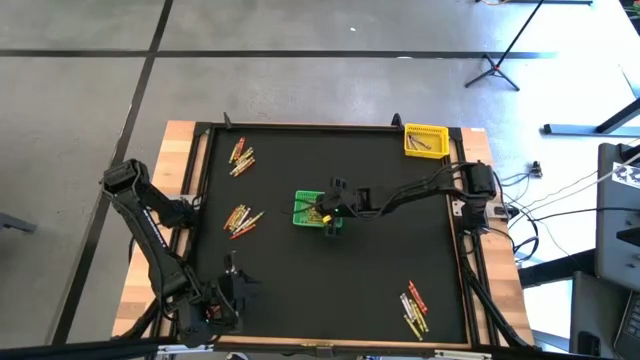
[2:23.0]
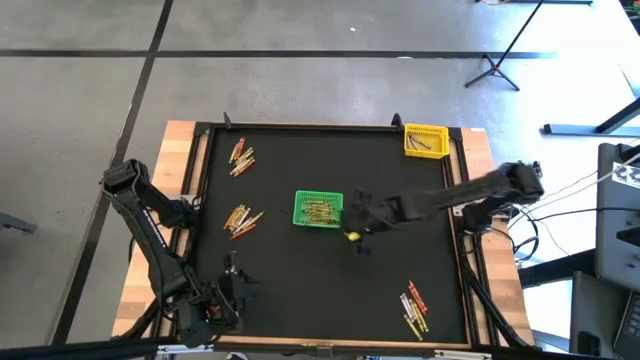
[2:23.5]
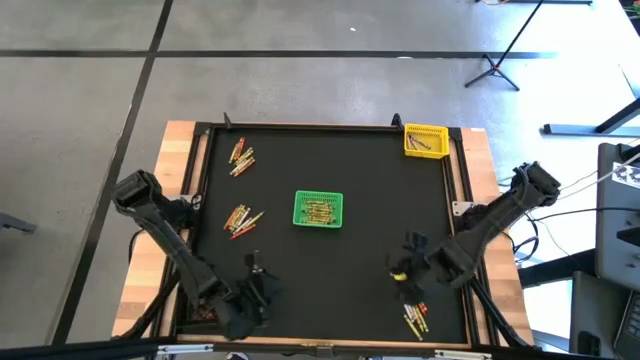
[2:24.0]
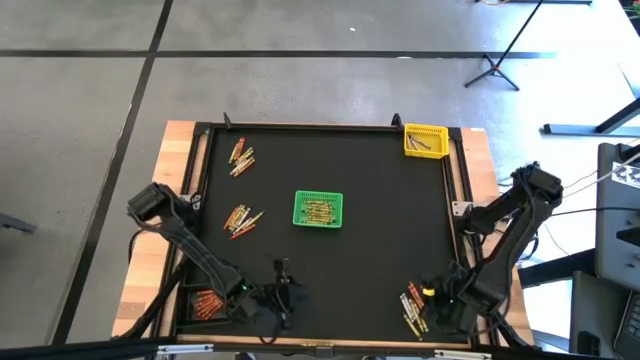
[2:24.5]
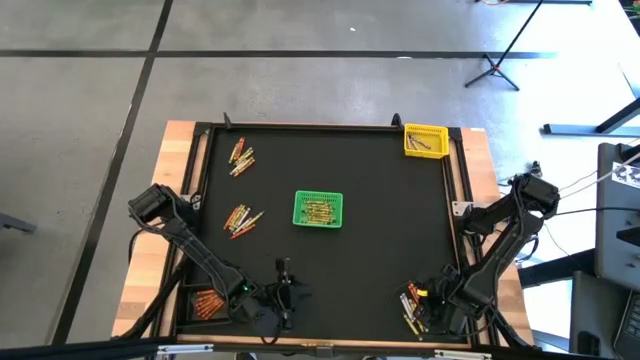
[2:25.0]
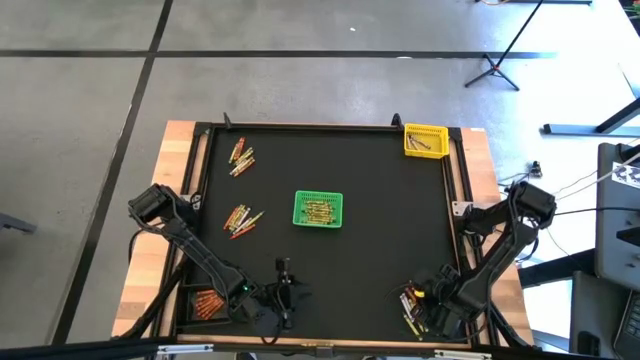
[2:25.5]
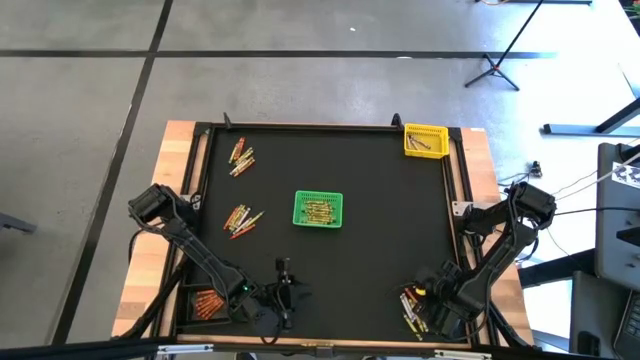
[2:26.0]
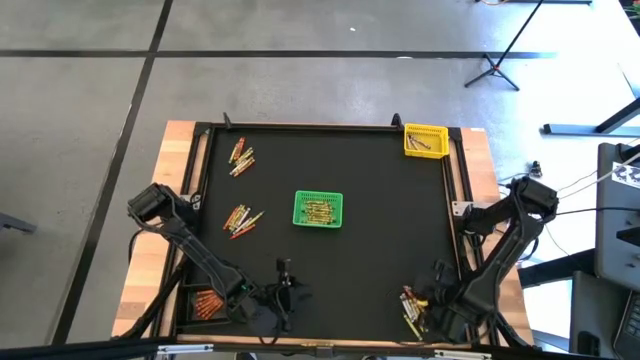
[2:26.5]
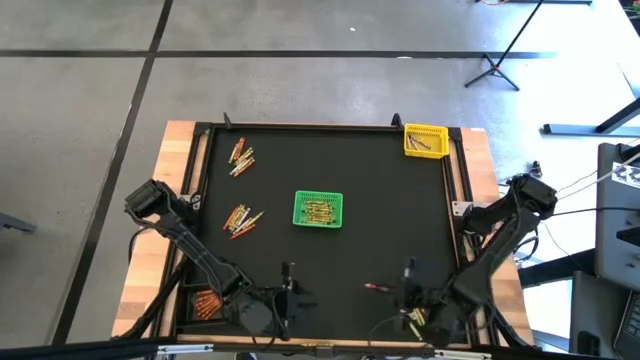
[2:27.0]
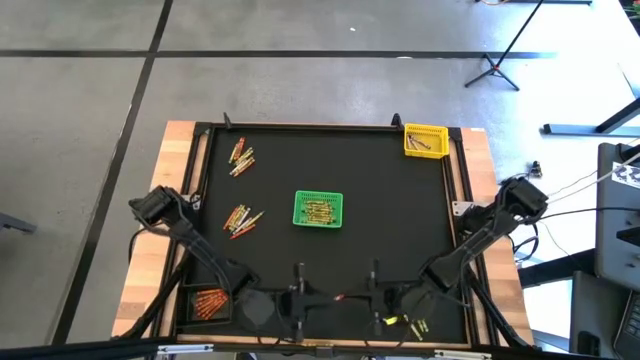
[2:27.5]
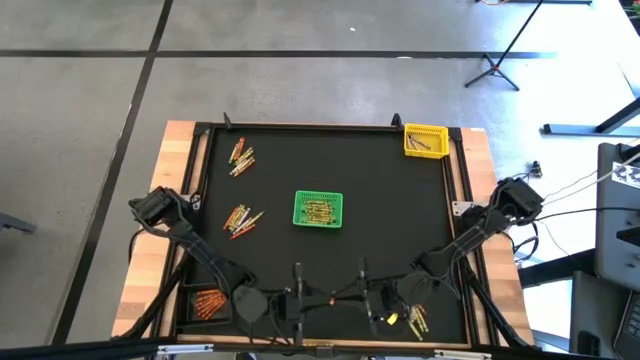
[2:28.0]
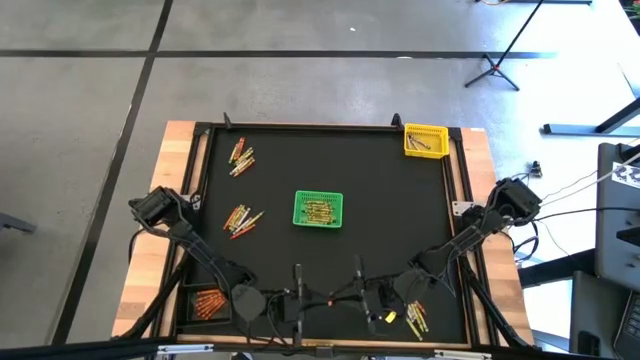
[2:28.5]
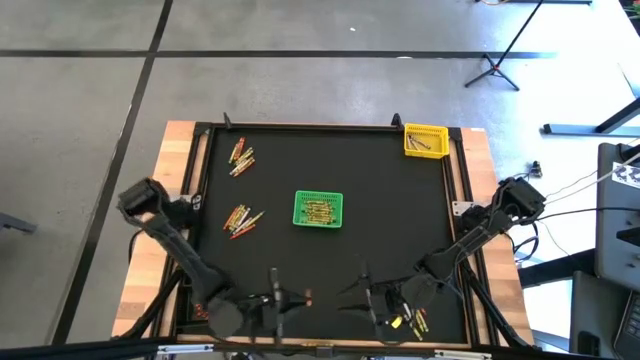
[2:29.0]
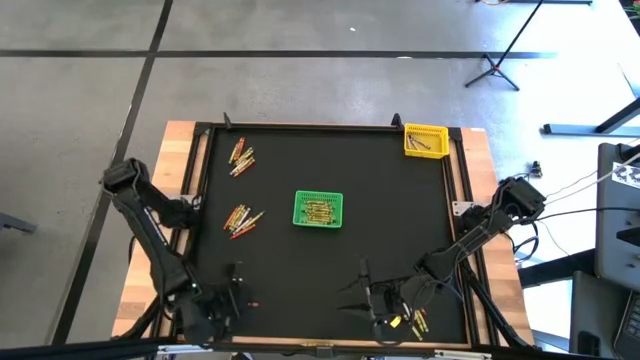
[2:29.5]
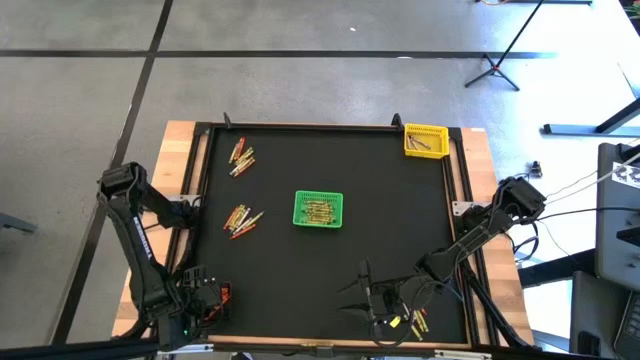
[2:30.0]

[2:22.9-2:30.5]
Task: Sort crayons
Put the orange crayon into the black bin

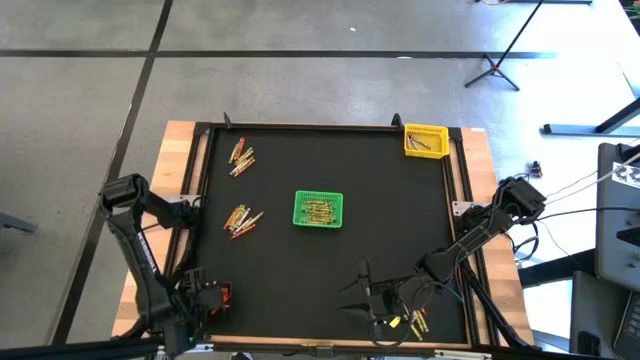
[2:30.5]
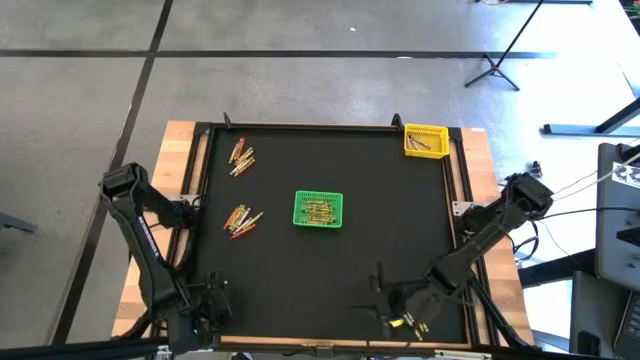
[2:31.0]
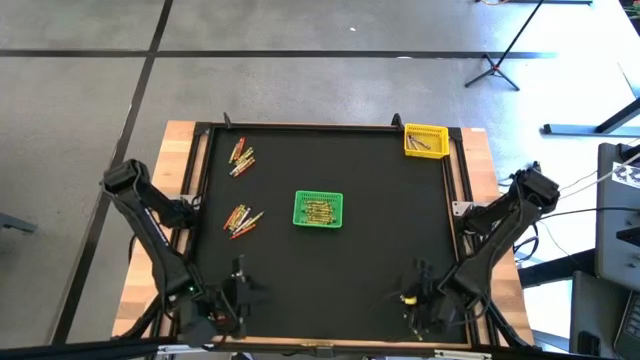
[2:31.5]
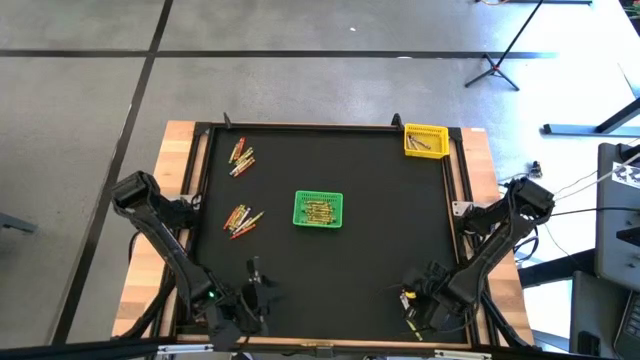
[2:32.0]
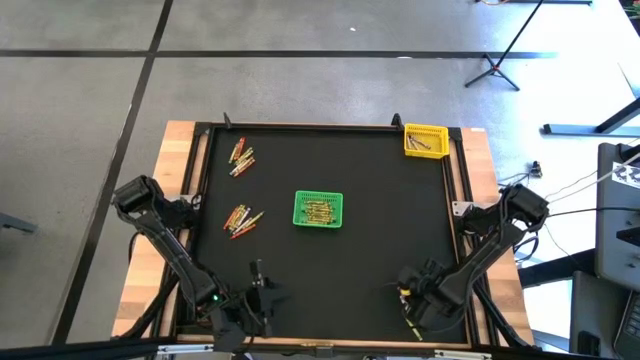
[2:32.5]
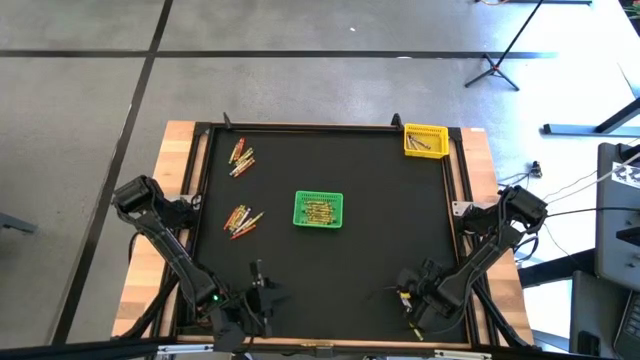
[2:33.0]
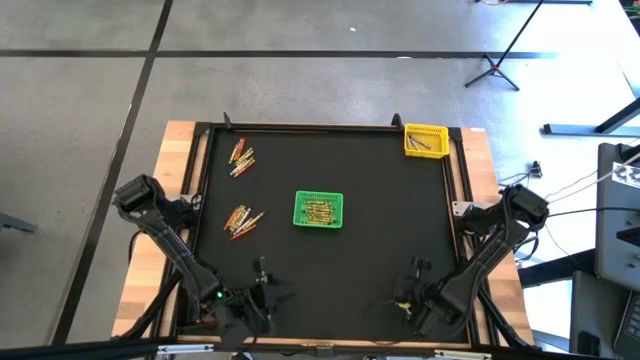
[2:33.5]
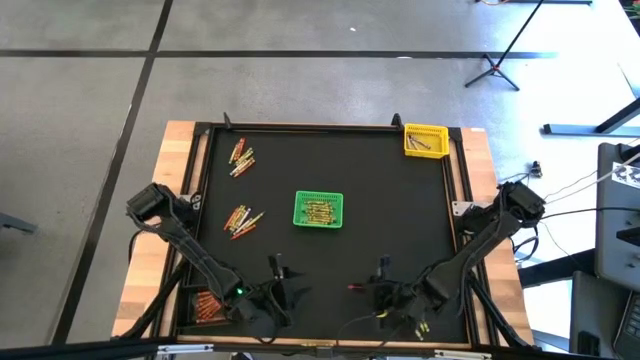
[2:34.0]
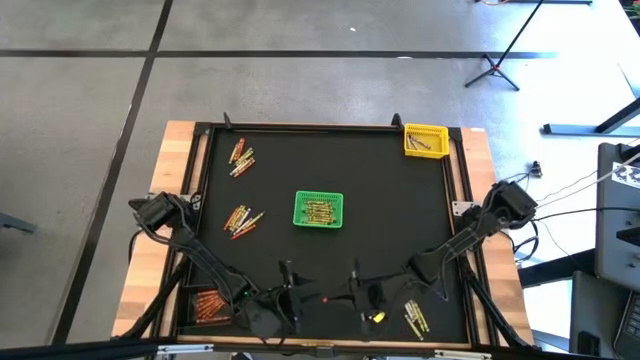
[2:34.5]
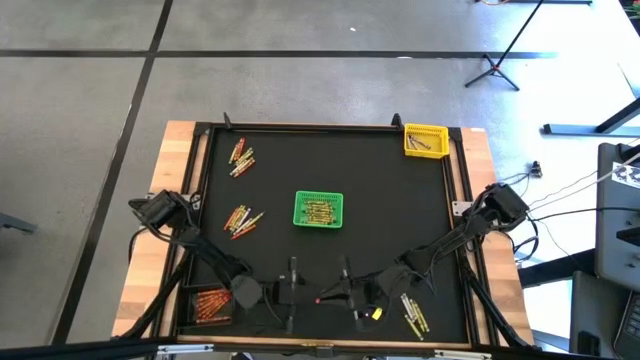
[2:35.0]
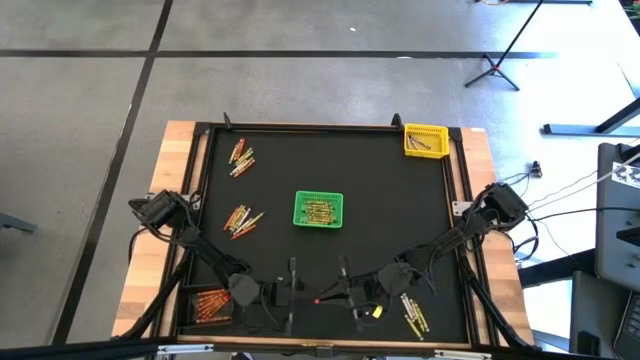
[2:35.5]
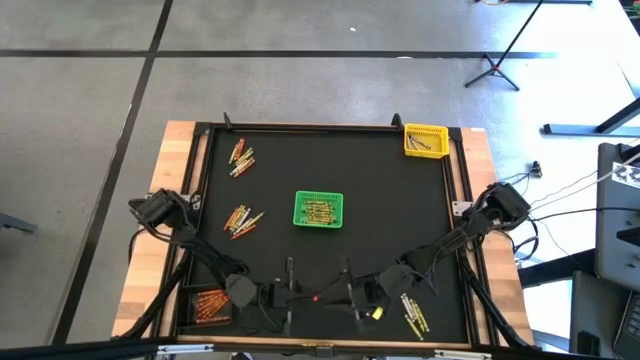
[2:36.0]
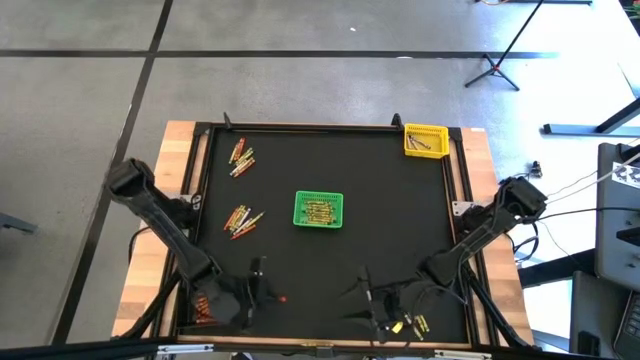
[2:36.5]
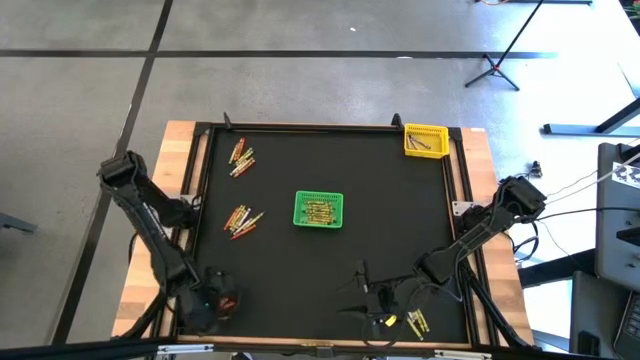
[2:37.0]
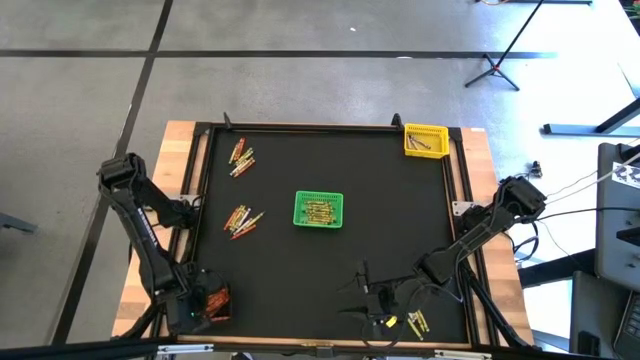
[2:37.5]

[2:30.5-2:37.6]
Put the orange crayon into the black bin

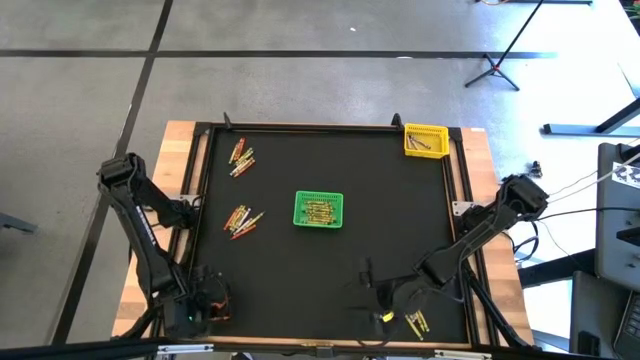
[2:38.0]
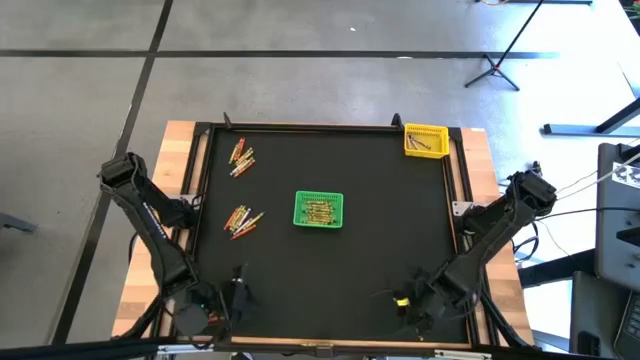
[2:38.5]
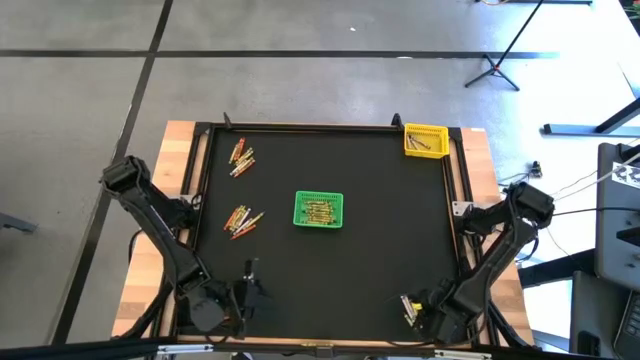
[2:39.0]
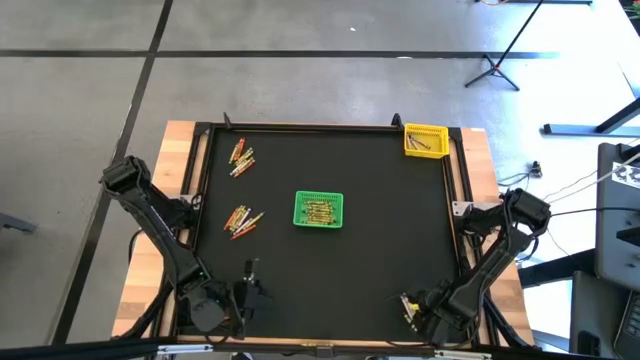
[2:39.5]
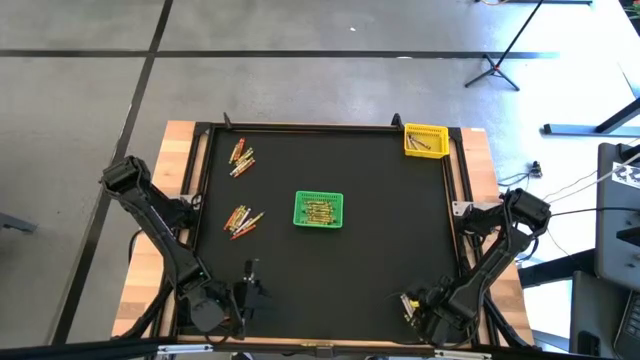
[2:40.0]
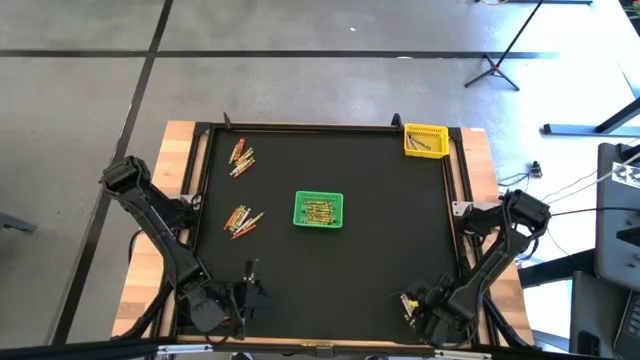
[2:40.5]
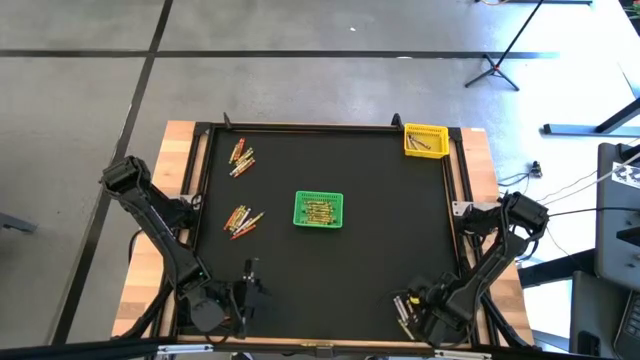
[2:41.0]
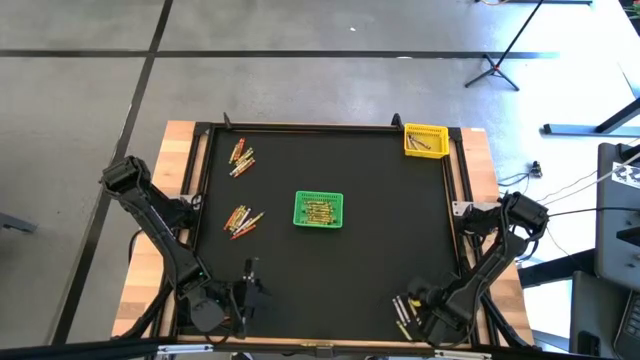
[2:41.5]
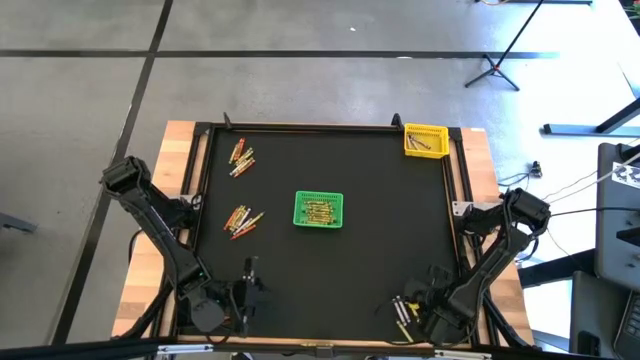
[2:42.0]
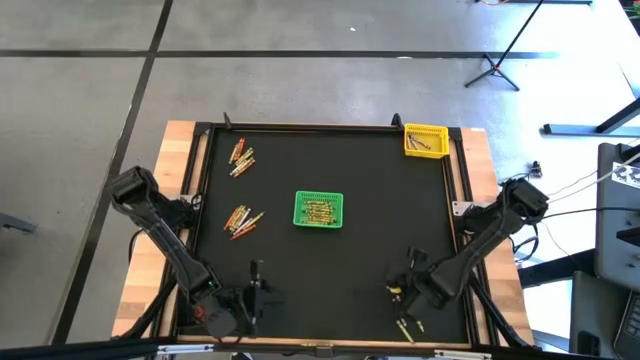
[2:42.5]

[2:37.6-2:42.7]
Put the green crayon into the green bin

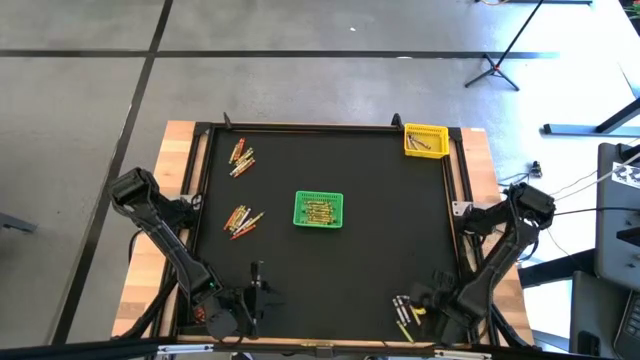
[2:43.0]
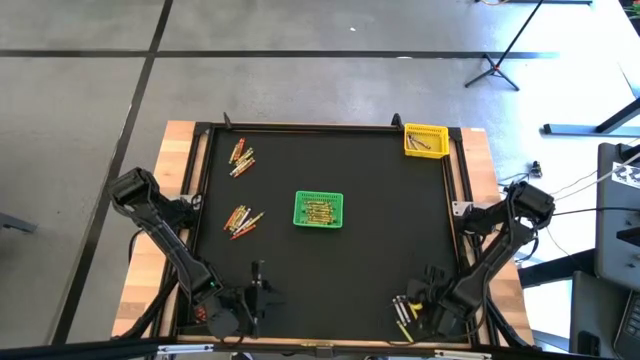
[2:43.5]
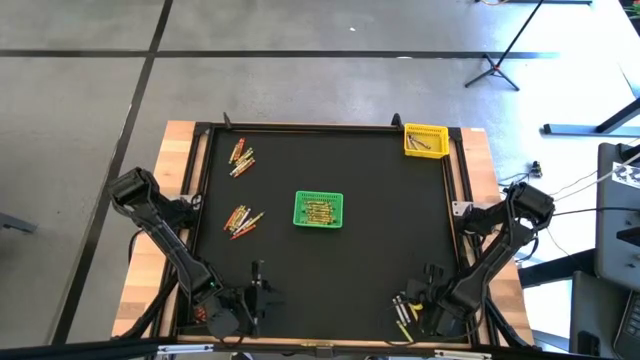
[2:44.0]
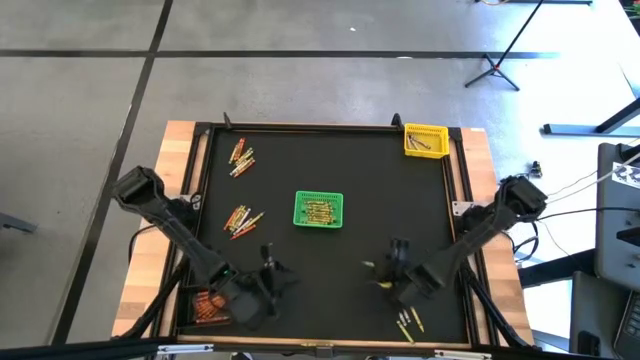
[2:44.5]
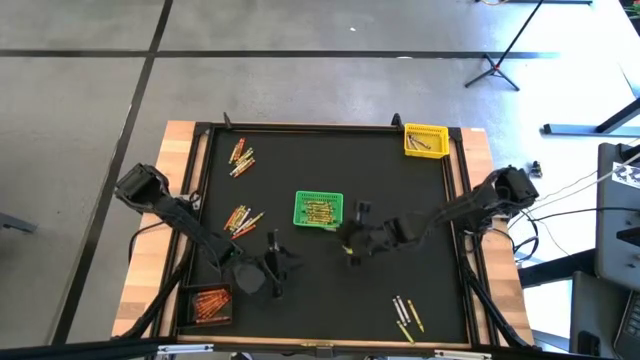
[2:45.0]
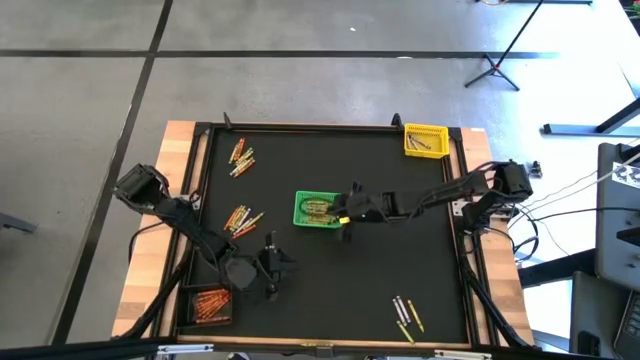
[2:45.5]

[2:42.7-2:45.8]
Put the green crayon into the green bin
